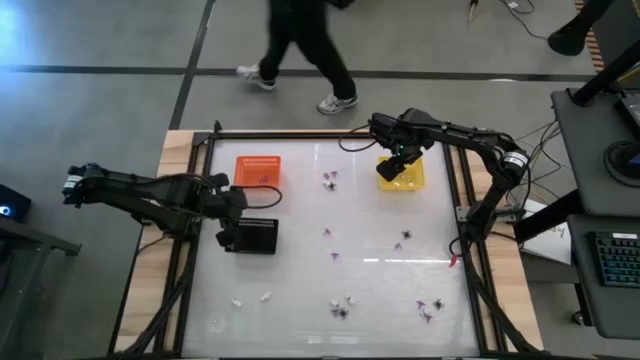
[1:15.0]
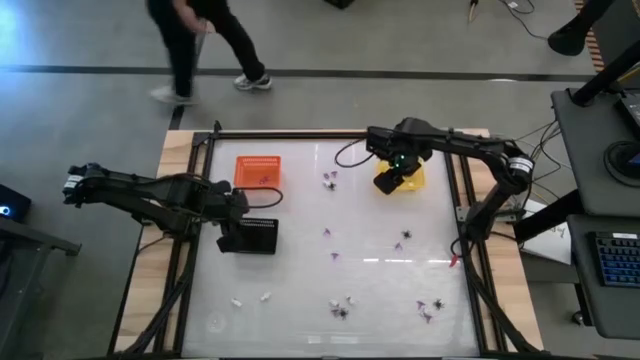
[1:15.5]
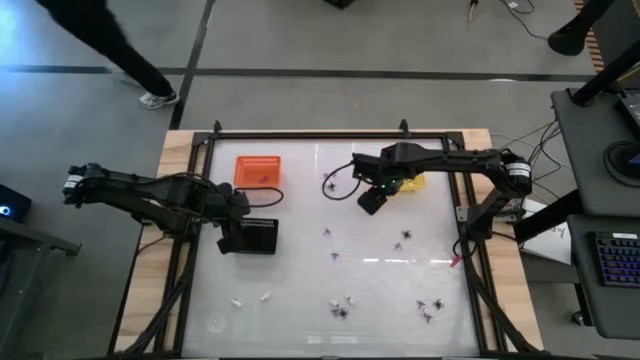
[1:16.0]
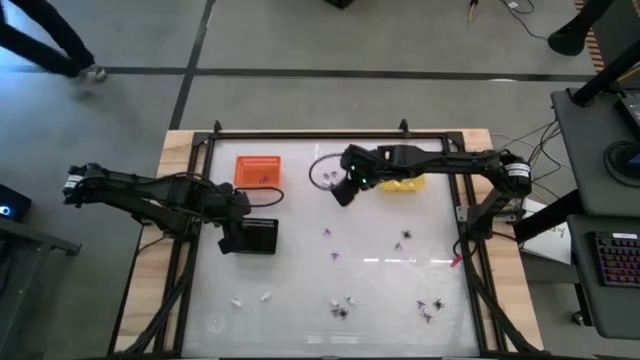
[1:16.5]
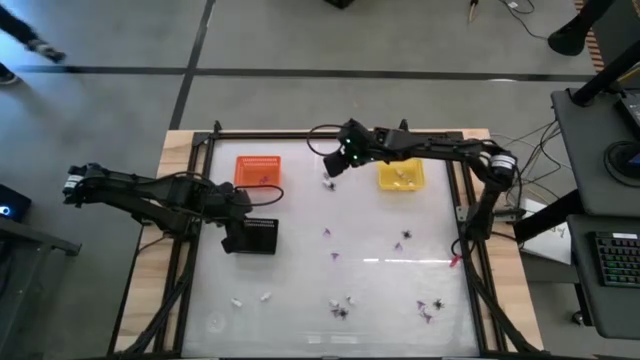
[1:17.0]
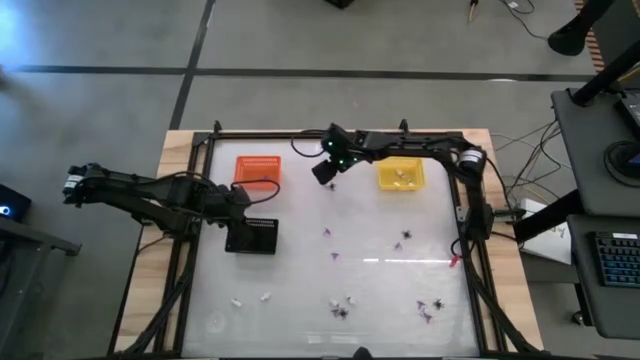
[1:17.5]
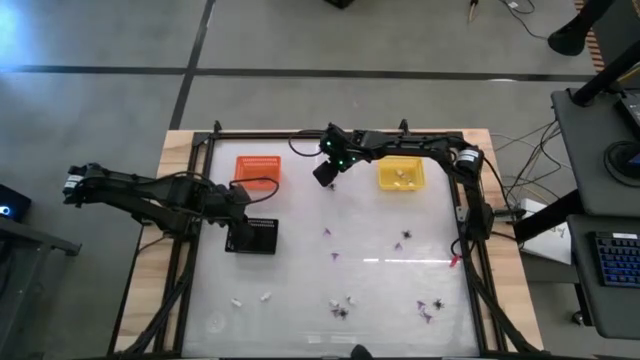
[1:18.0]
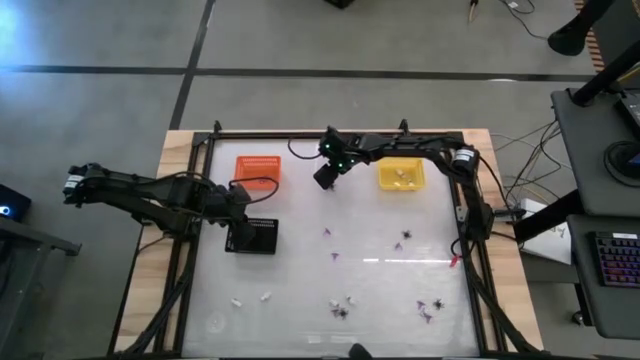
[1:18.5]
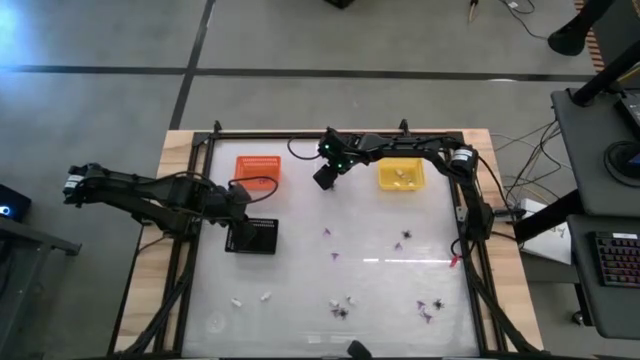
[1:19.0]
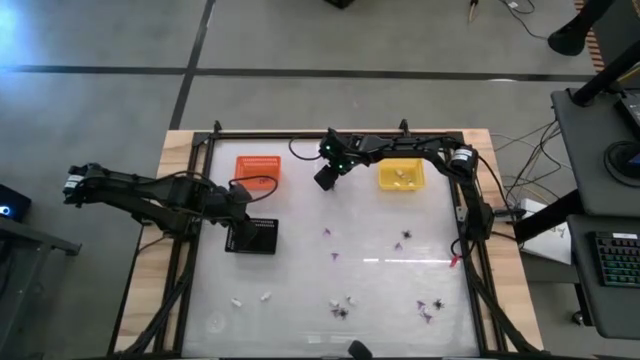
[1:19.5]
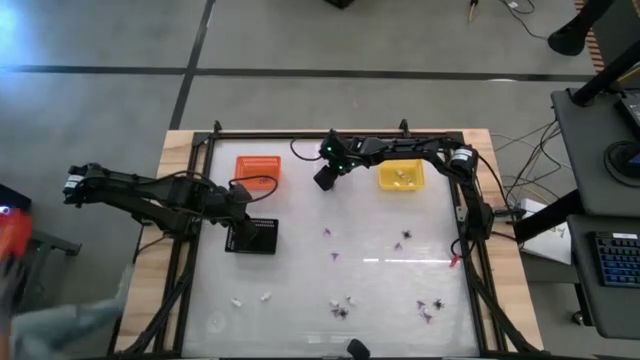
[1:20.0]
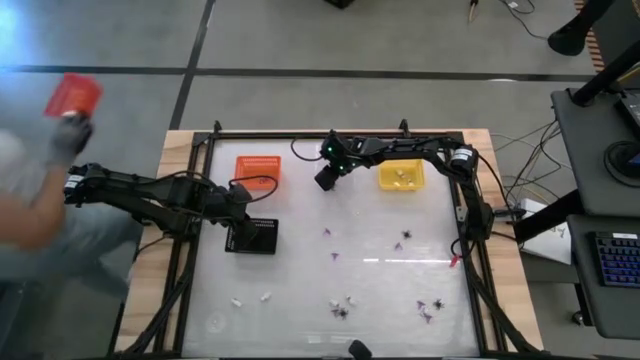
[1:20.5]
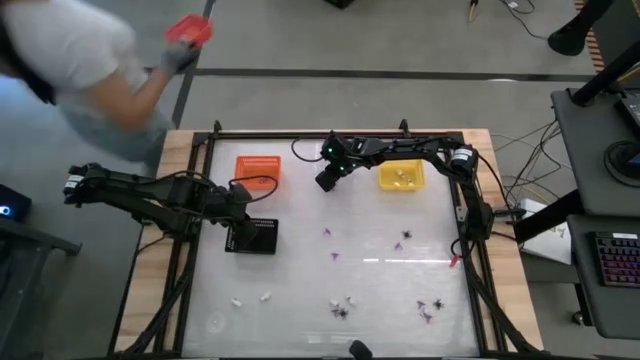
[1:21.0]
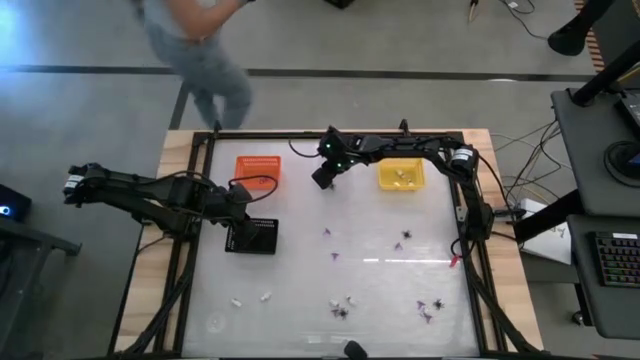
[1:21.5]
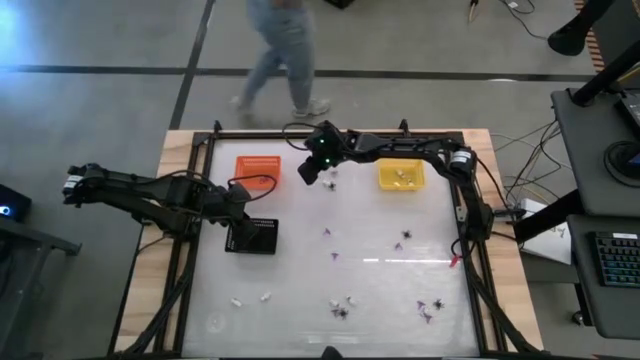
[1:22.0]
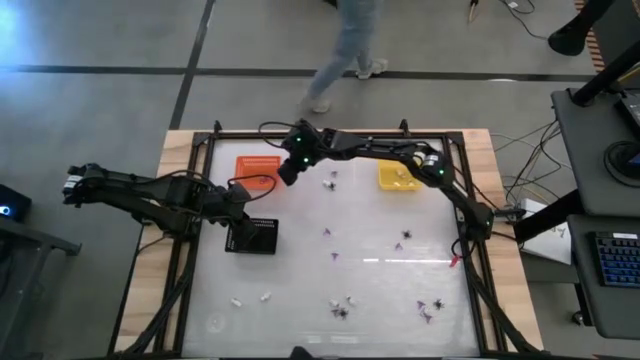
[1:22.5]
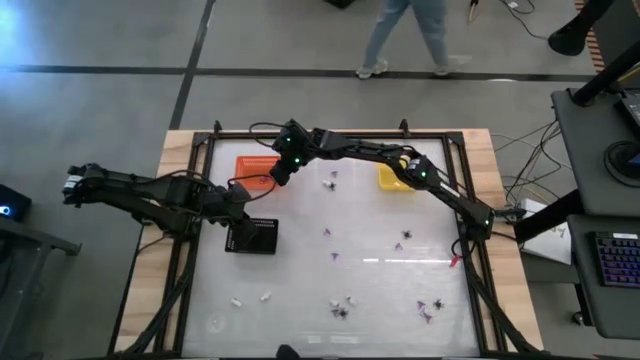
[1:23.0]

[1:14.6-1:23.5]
Task: Sort Halloween decoration
Put the violet witch hat toy into the orange bin

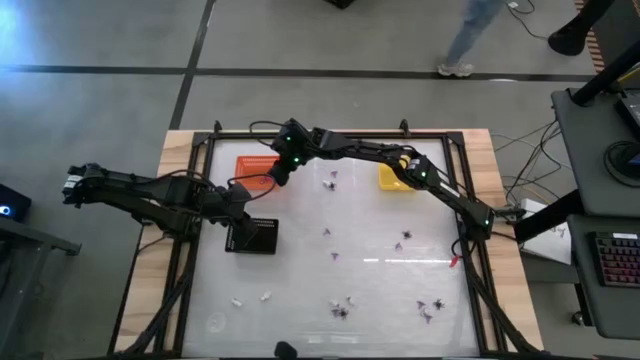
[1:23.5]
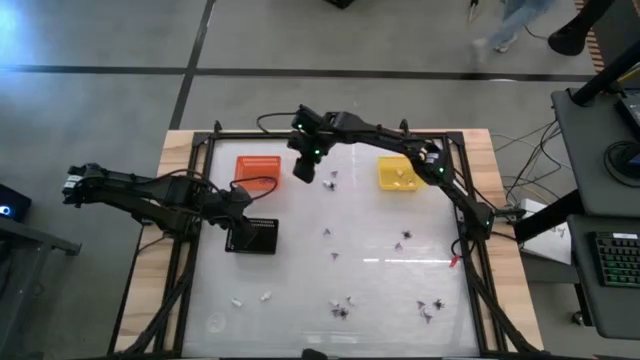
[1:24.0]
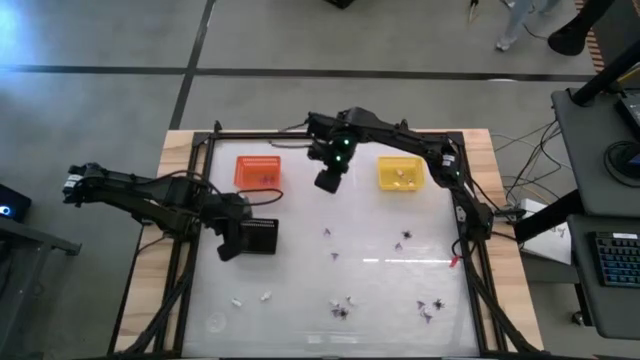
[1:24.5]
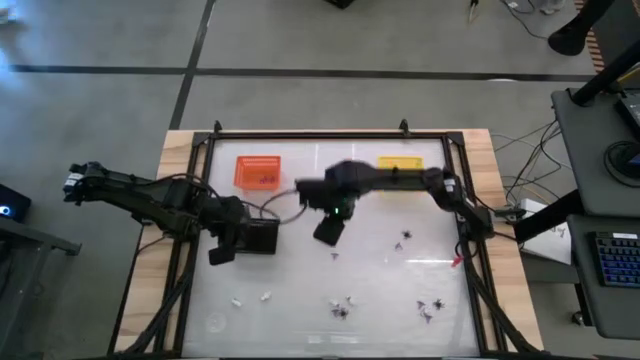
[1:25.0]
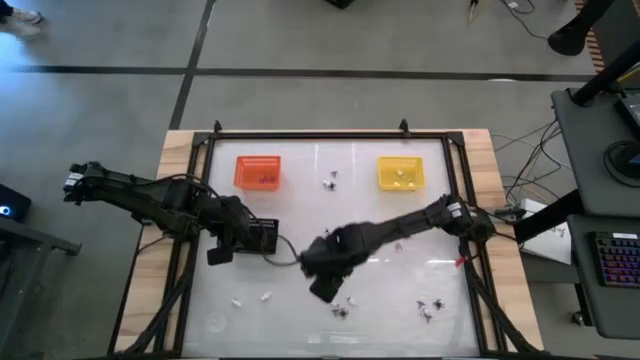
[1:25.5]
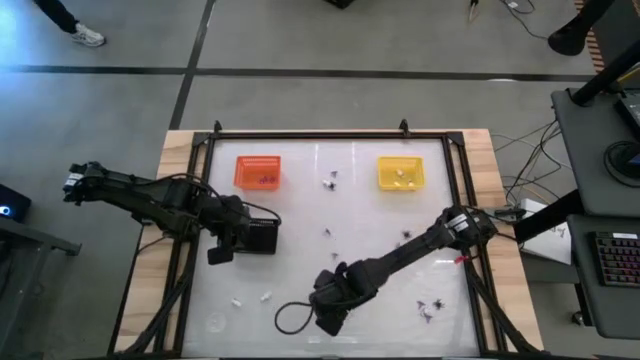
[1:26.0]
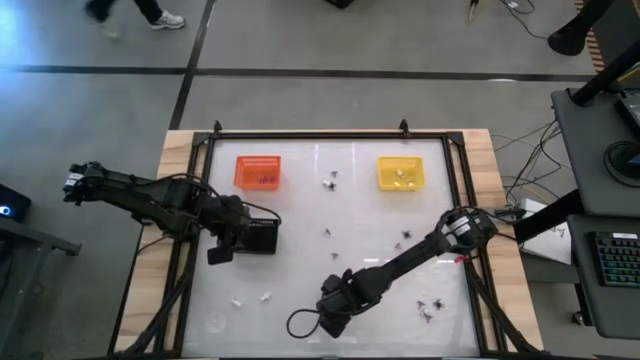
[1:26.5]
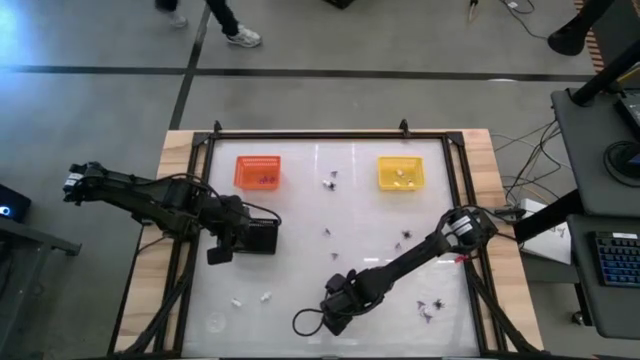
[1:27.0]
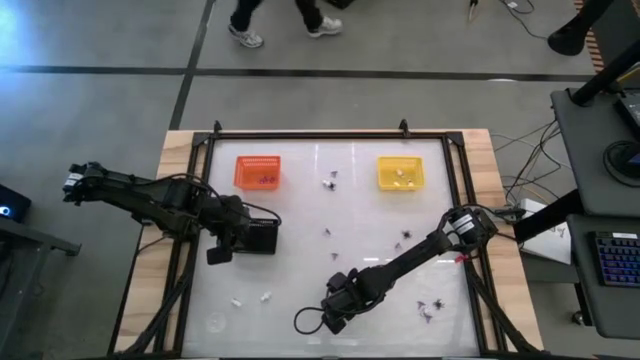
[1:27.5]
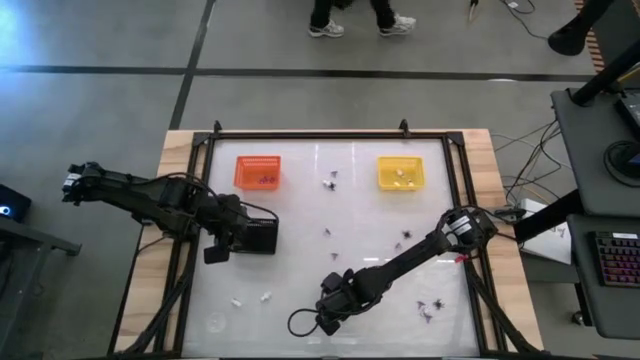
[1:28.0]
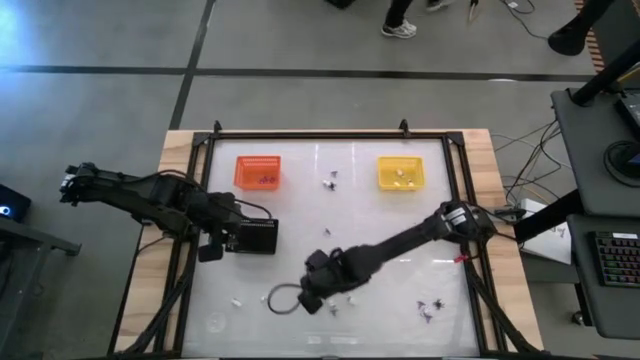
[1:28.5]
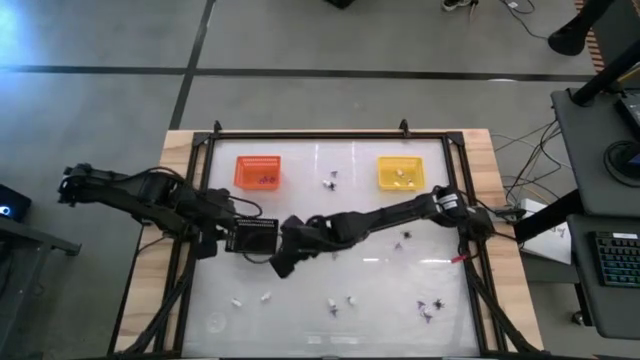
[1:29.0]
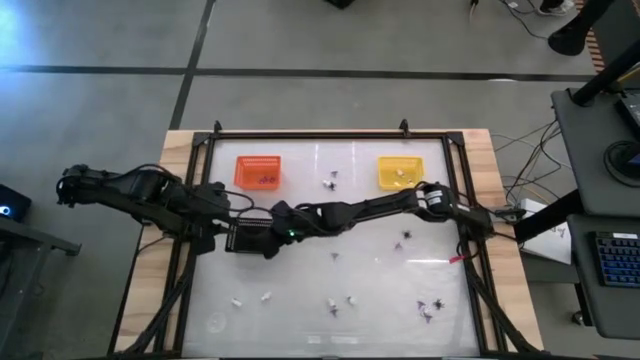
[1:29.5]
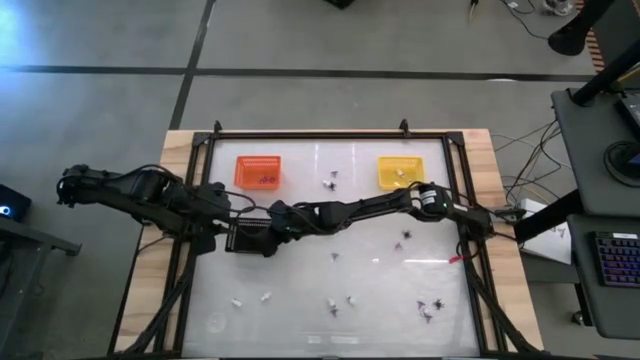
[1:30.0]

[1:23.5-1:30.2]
Put the black spider toy into the black bin

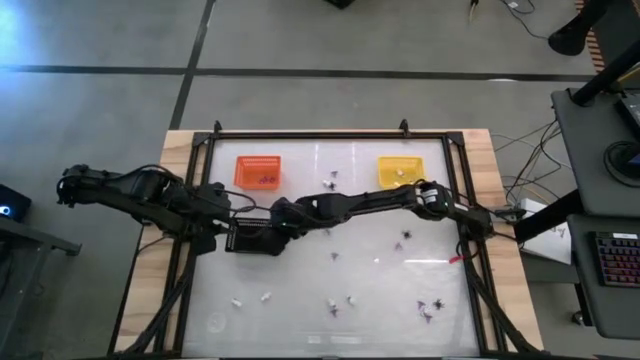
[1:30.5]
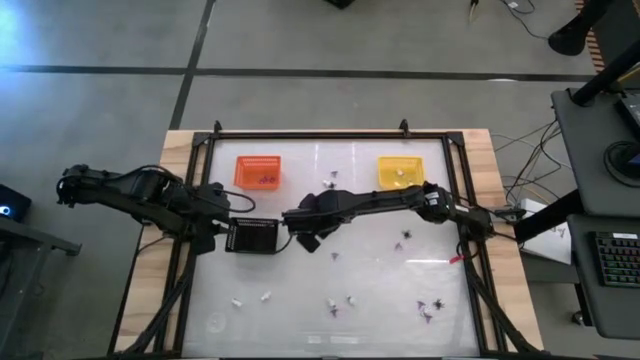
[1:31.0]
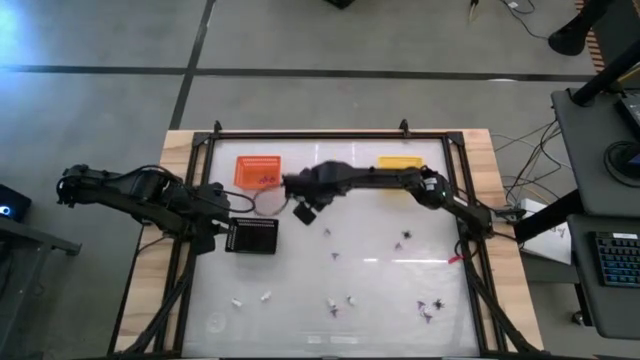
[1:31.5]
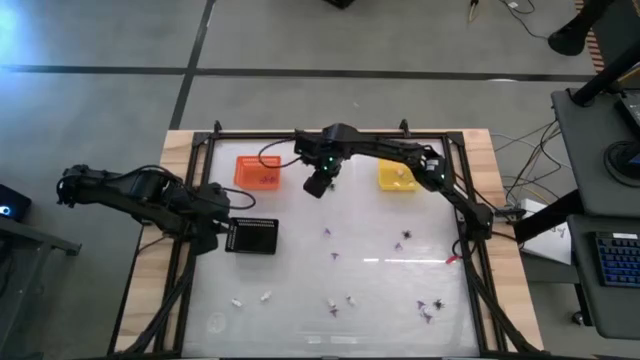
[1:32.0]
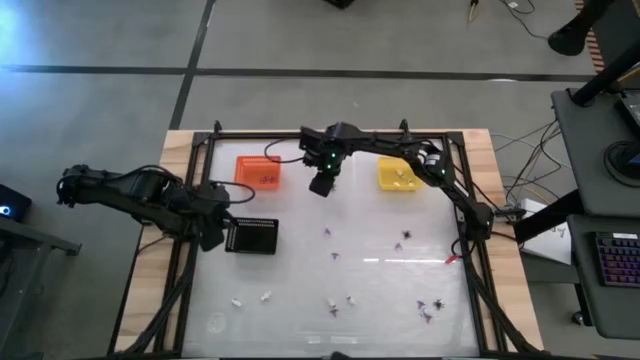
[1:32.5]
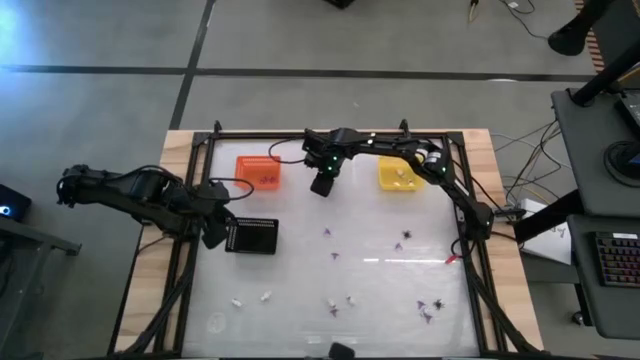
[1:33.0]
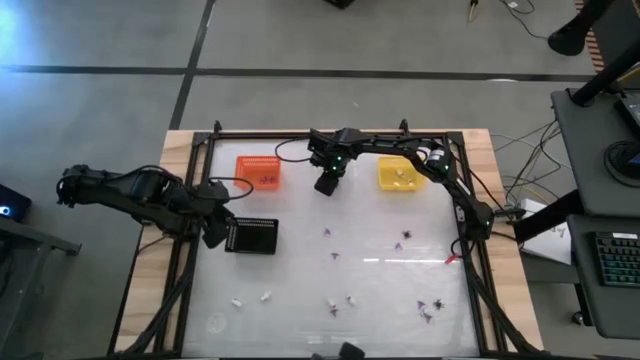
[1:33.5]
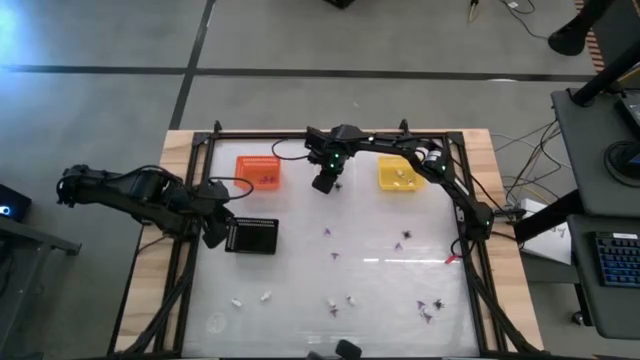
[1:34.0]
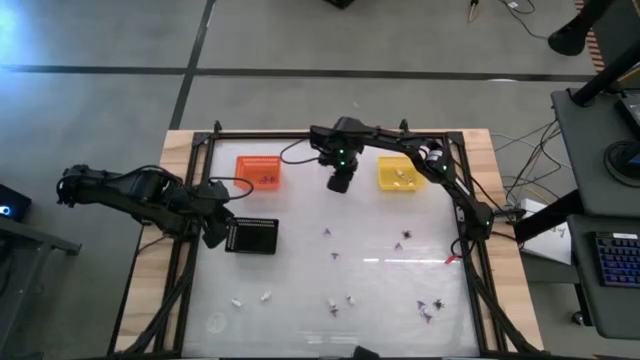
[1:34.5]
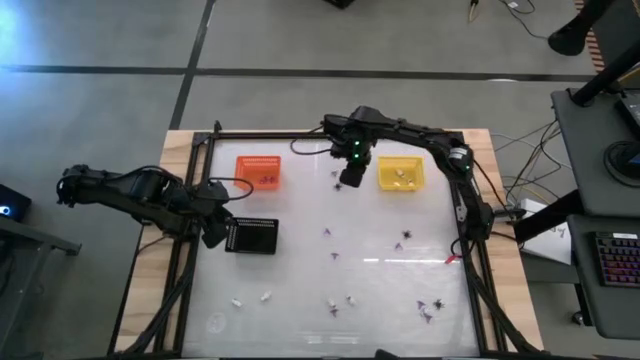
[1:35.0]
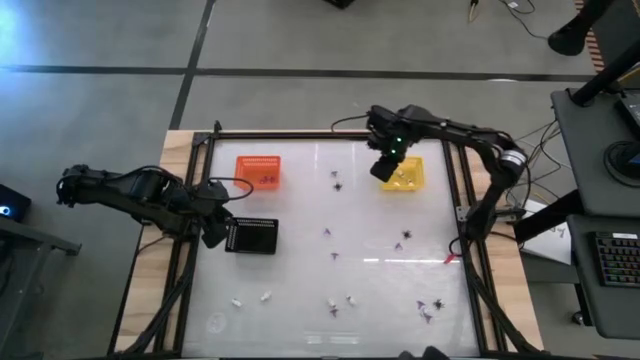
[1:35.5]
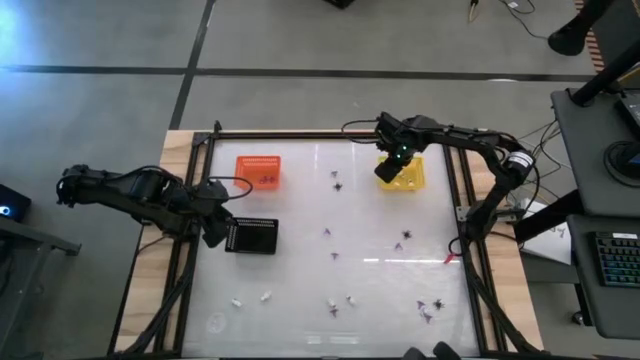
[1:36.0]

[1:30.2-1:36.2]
Put the white skull toy into the yellow bin
